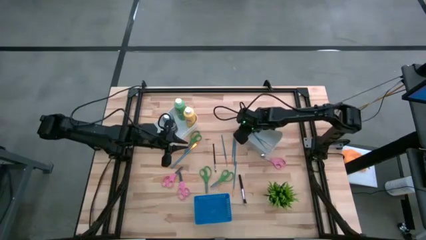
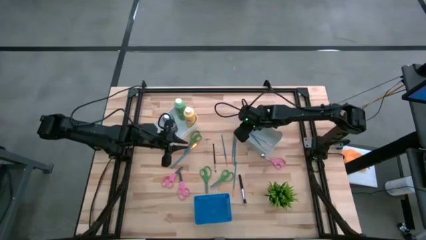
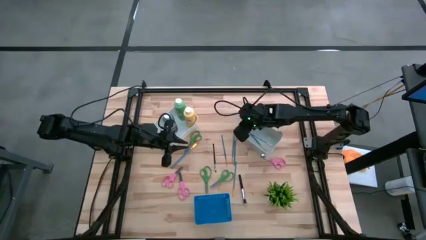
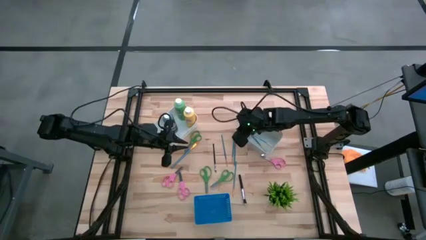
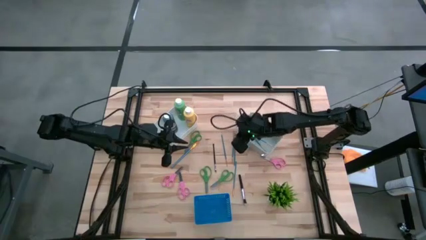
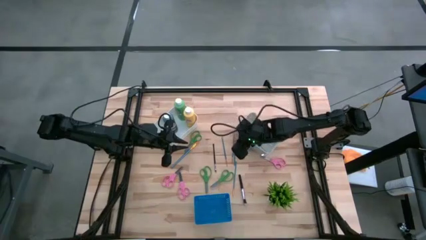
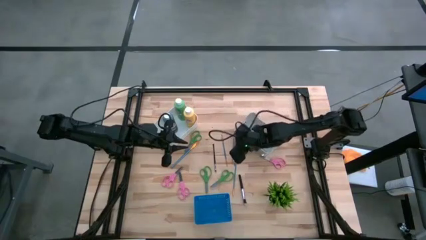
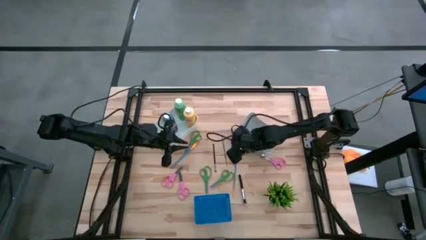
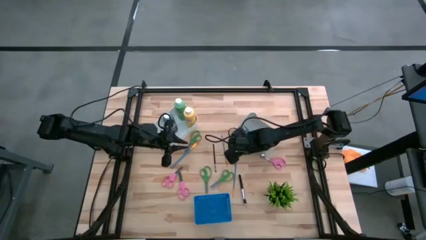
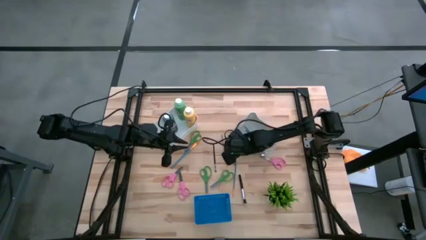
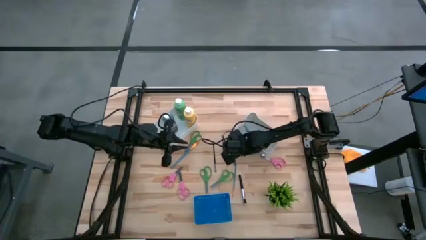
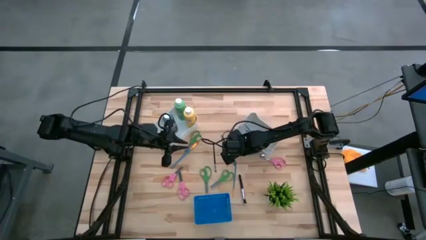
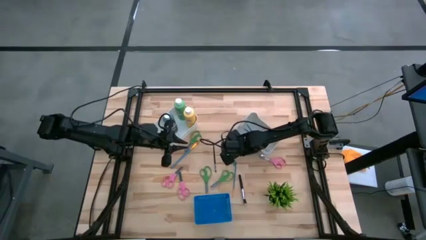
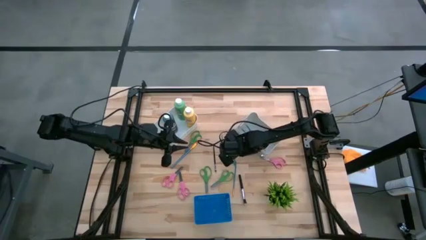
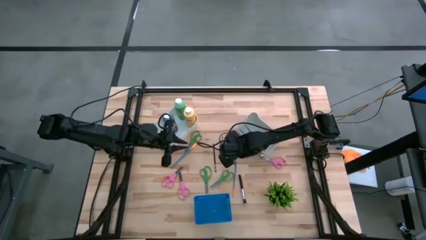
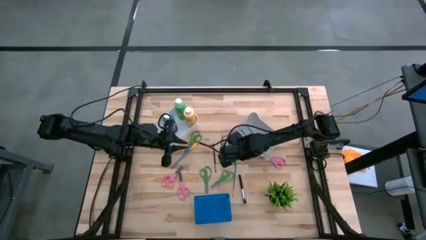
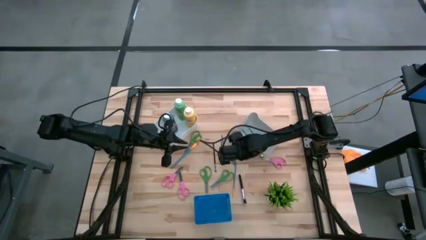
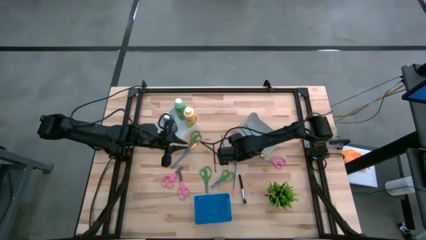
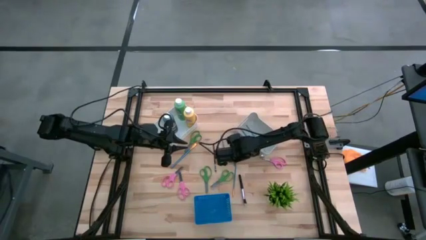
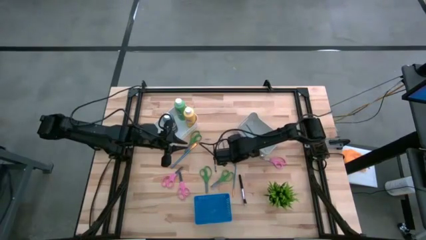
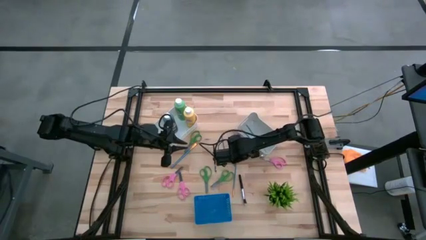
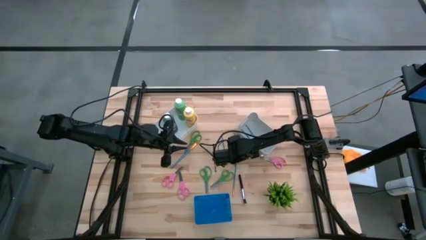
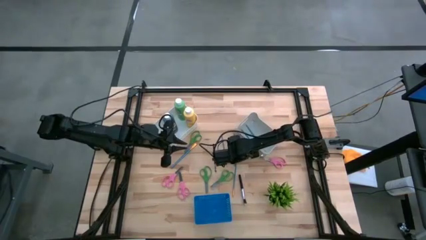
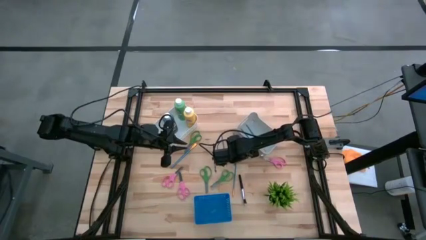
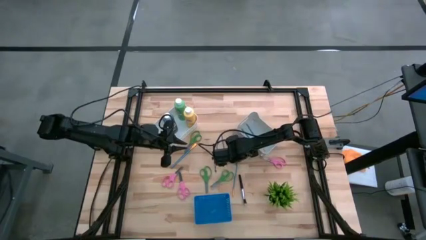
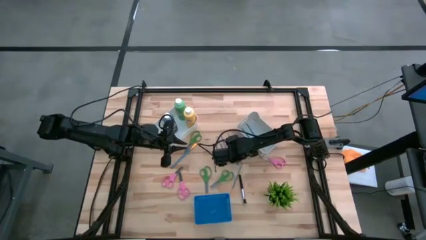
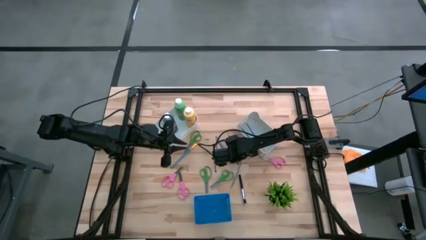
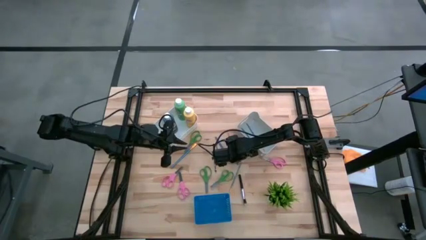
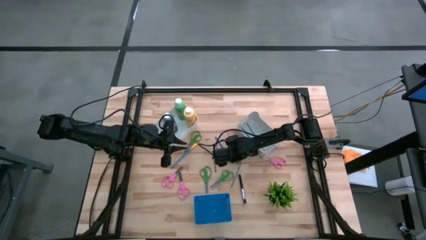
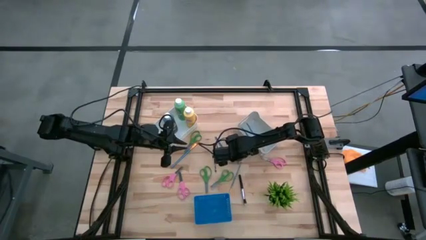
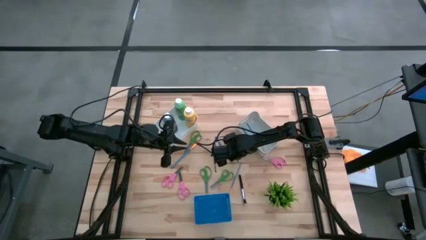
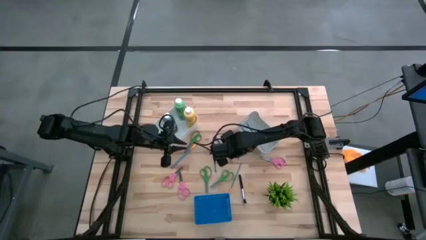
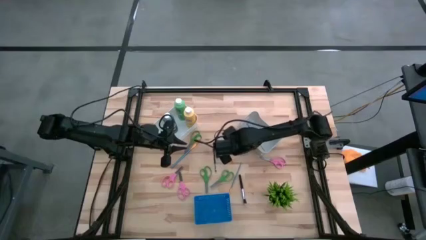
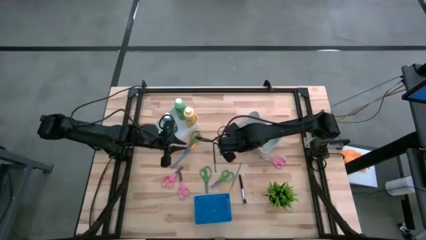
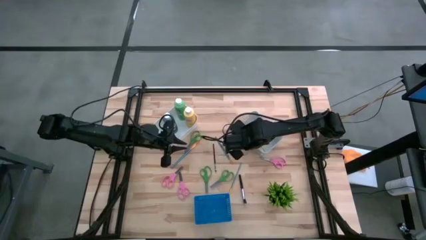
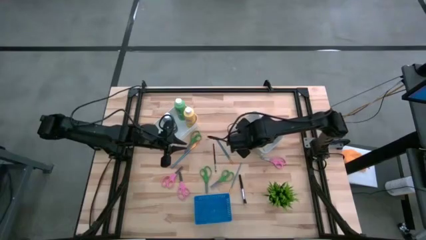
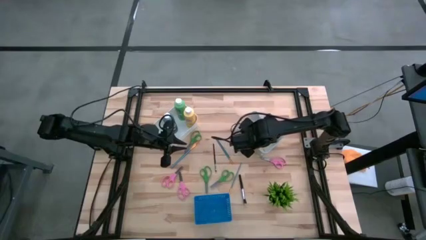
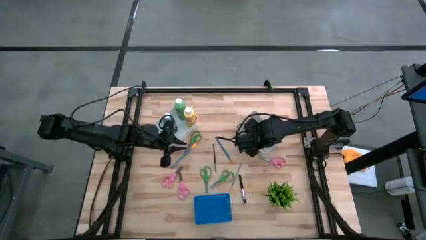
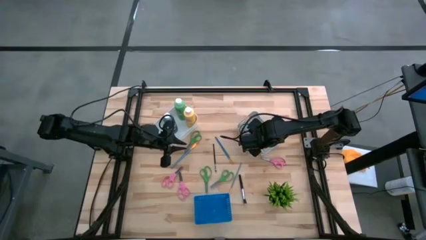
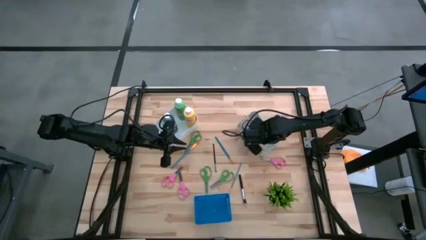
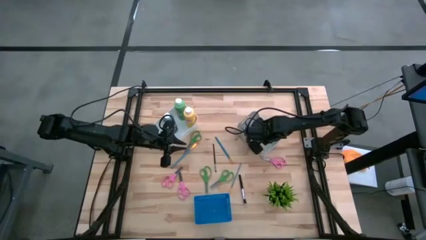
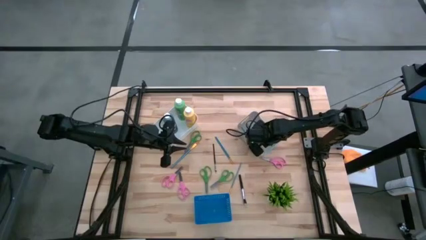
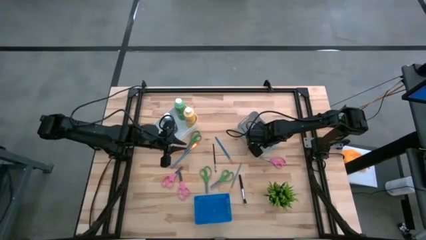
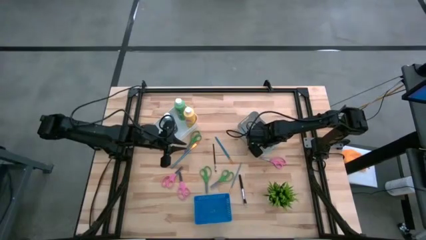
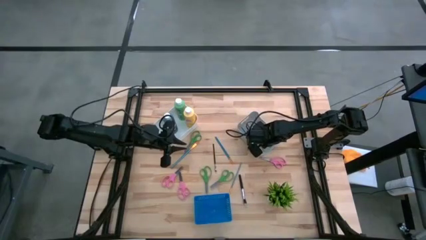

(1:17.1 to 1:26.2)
Task: Pick & Place Paint Supplies
Put the blue paintbrush into the gray bin

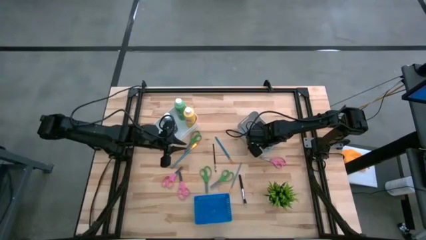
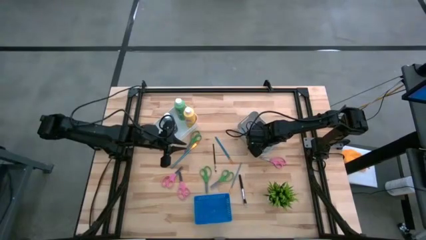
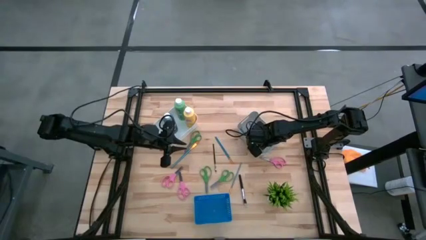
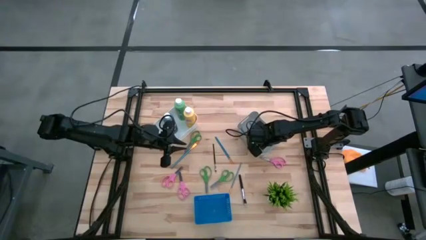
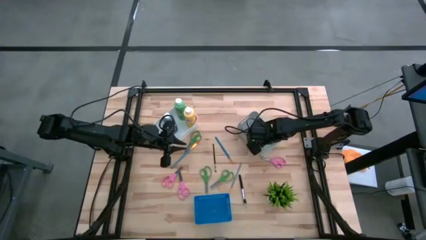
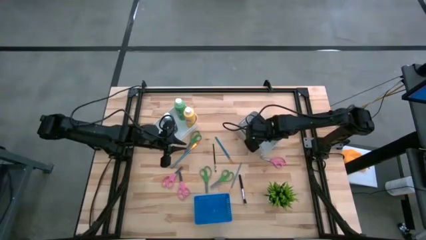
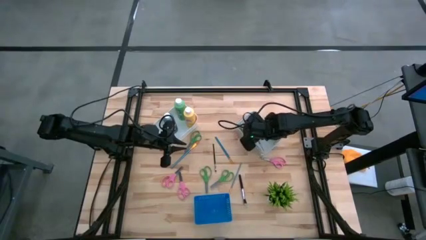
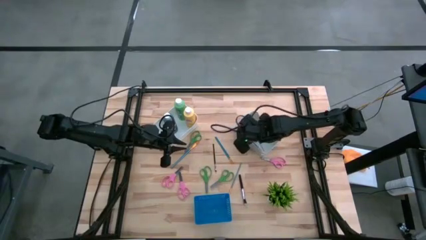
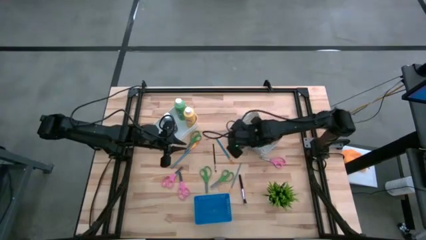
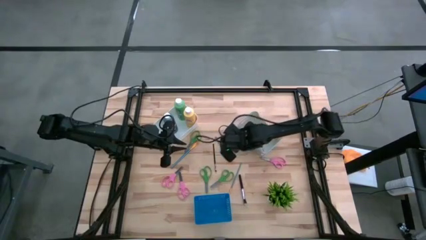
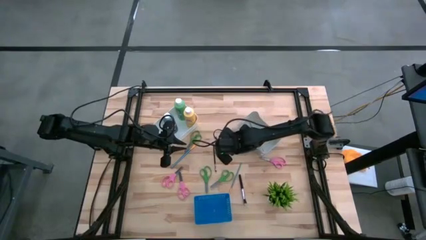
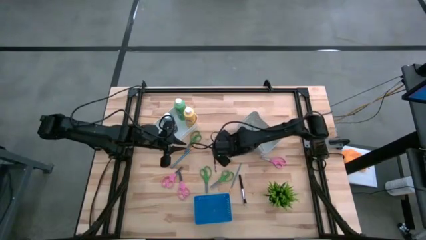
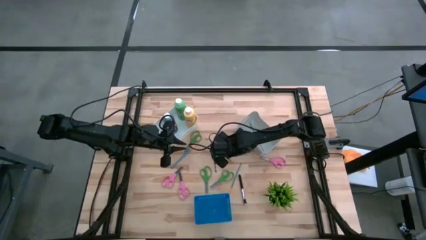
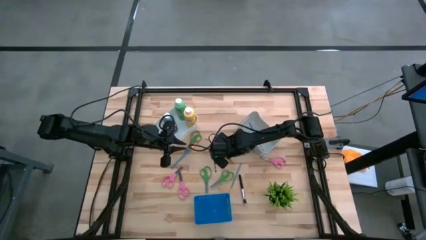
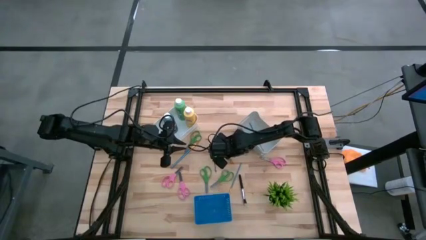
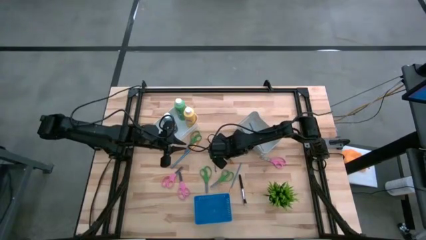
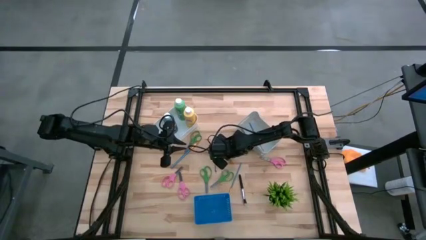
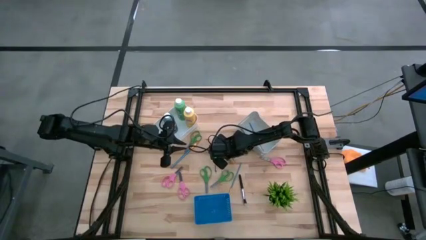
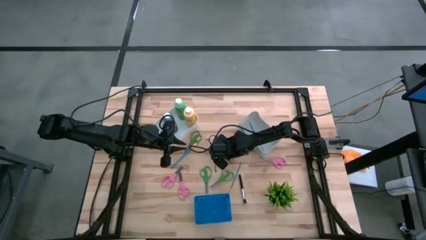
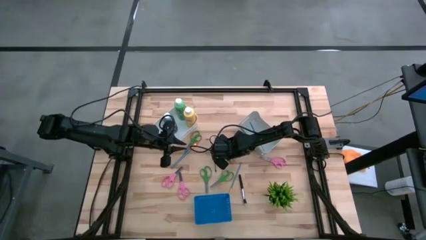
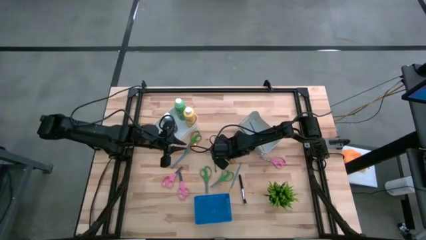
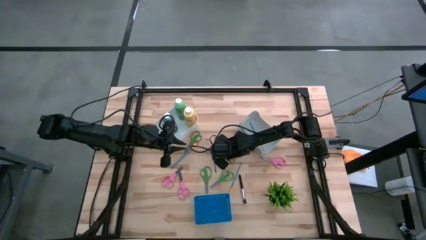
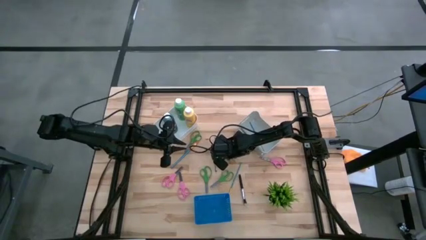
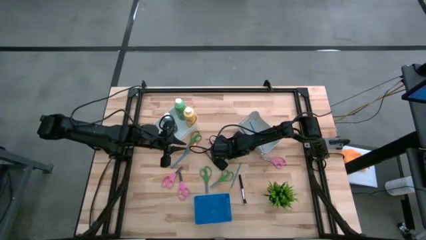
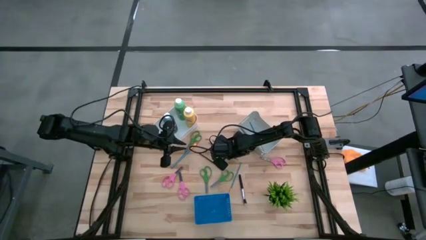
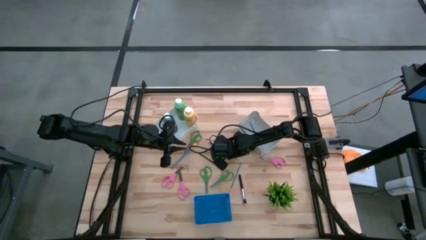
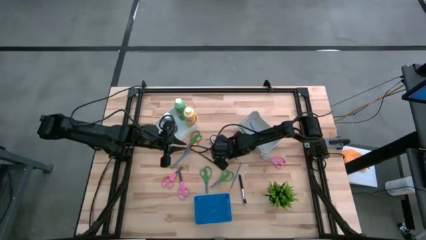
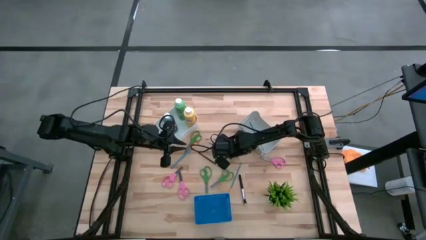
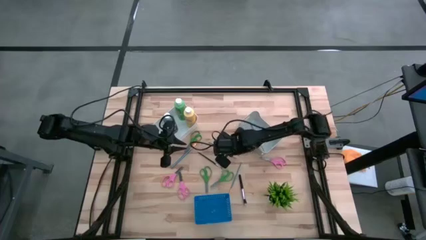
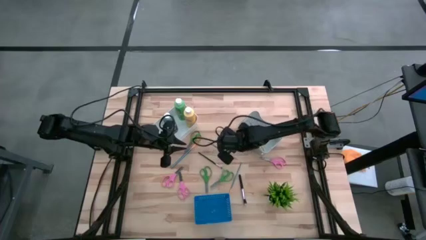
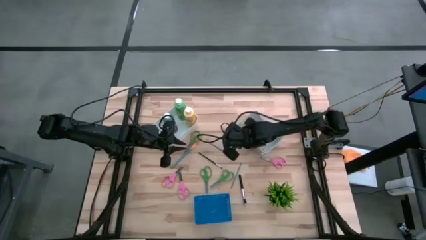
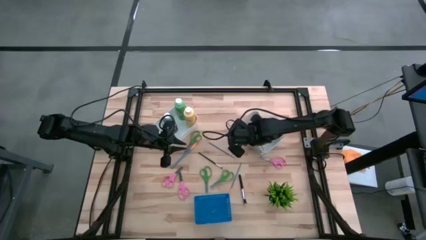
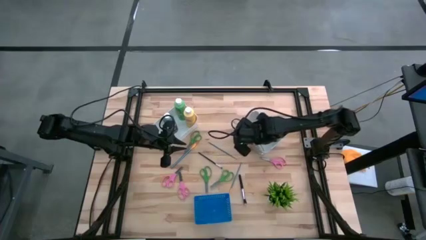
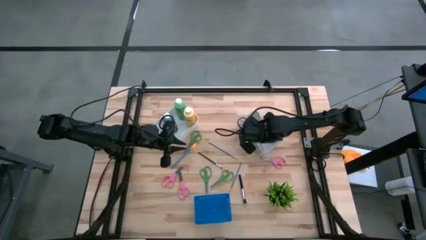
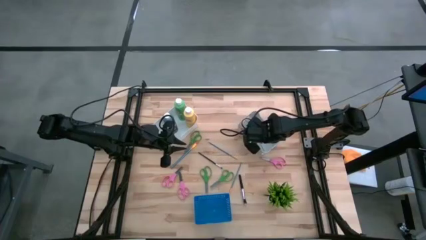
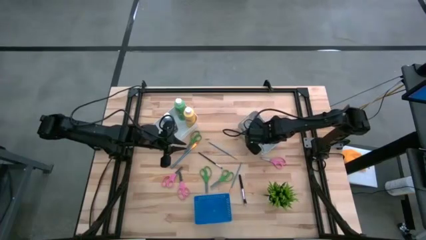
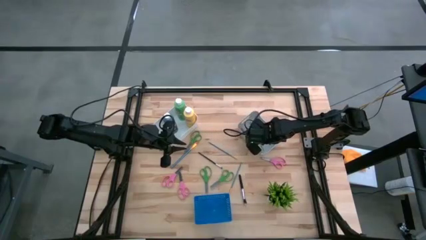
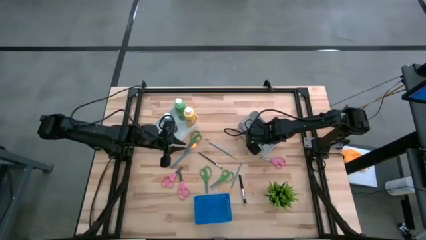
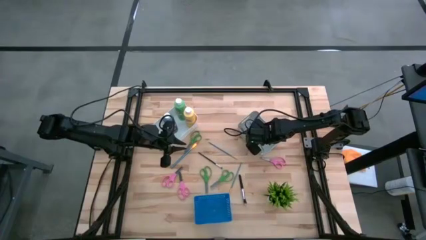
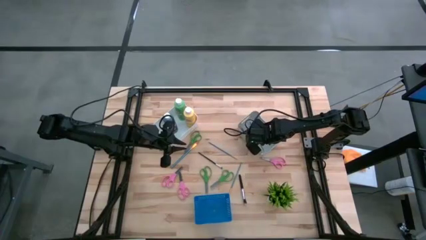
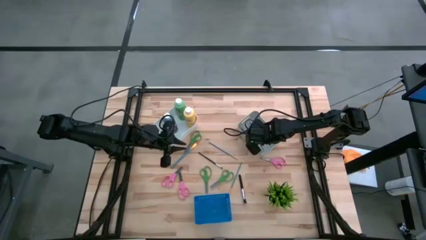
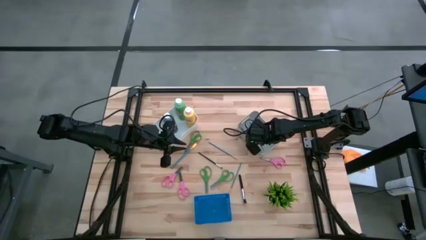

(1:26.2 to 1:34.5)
Put the blue paintbrush into the gray bin
